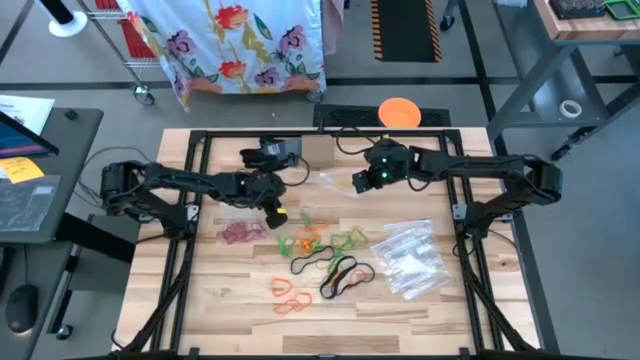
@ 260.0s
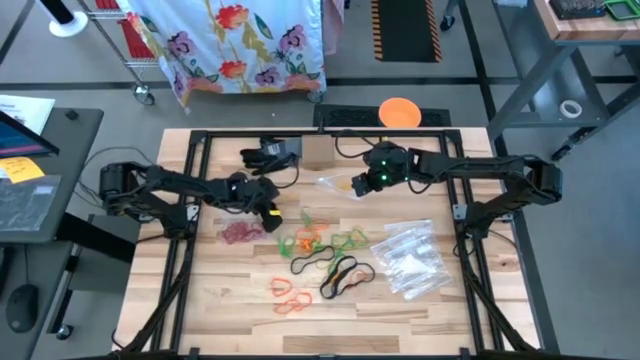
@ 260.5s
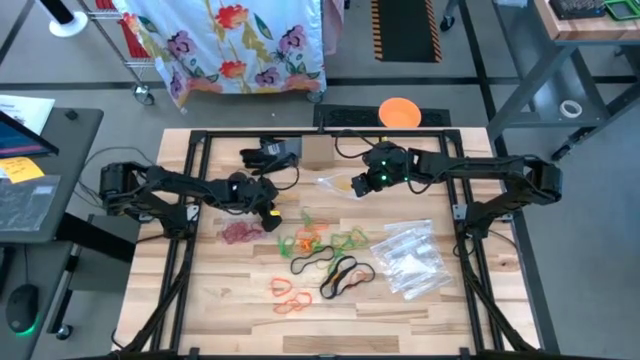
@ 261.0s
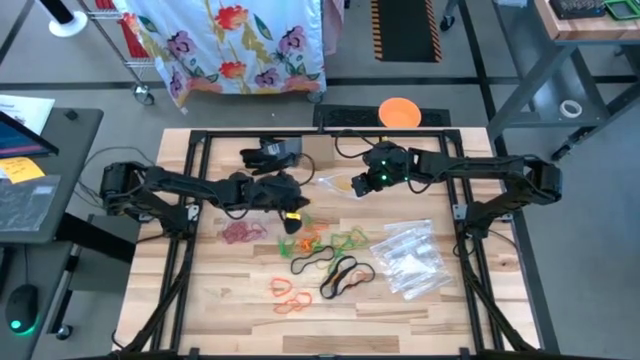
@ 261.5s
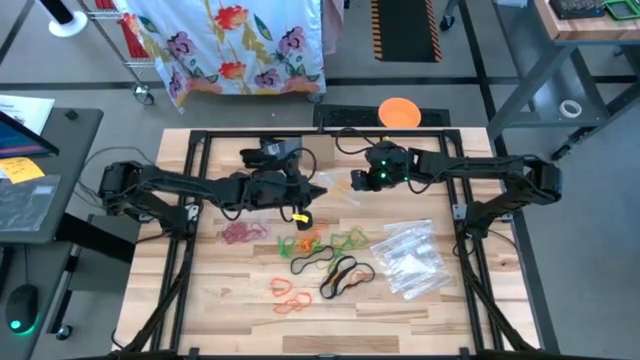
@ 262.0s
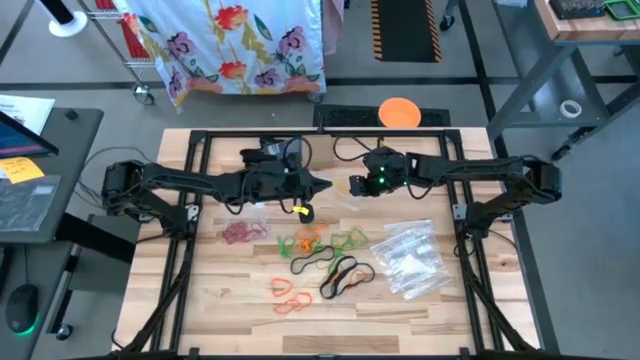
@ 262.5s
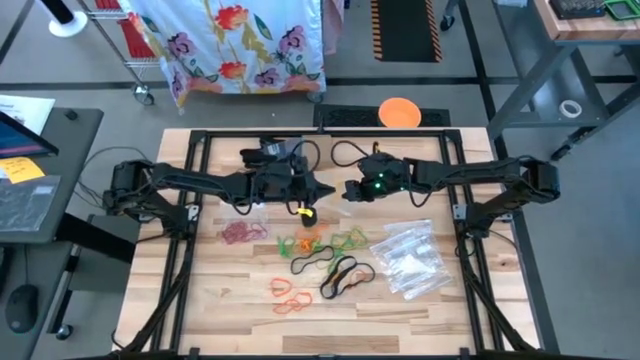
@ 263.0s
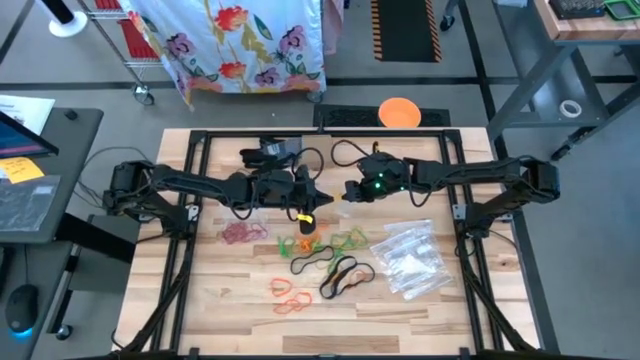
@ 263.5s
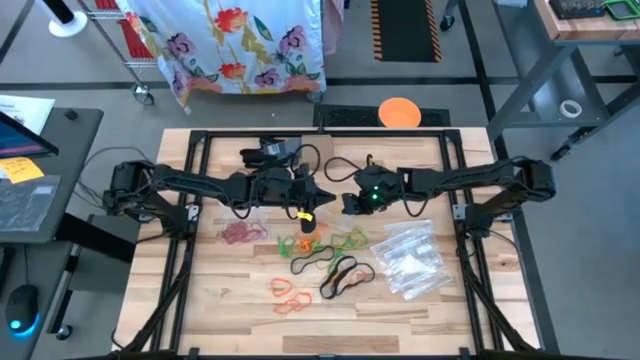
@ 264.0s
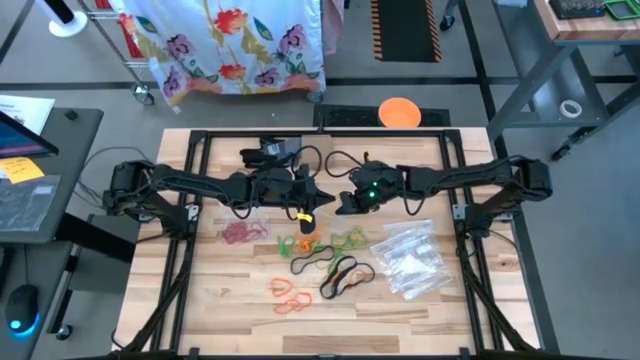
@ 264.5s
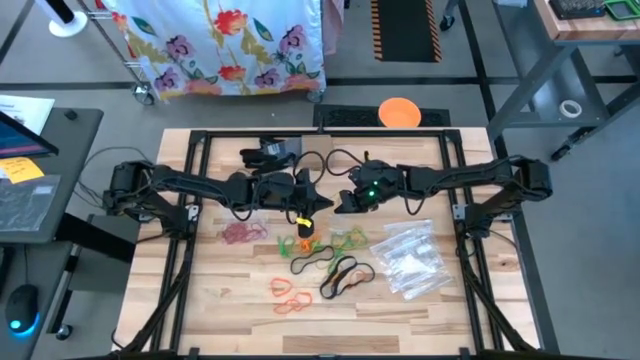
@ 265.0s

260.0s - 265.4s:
Task: Sort rubber bands
Put the yellow rubber band into the transparent zip bag

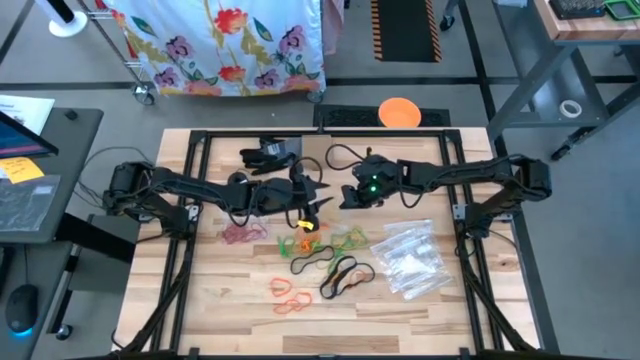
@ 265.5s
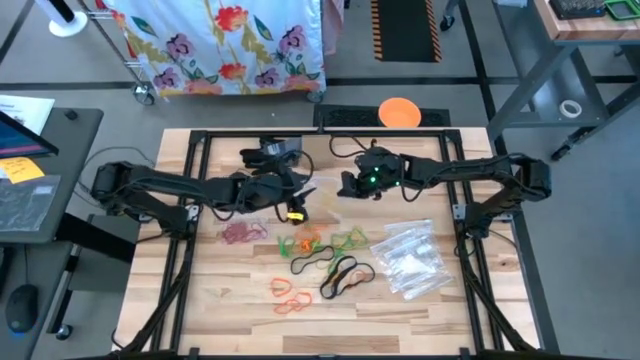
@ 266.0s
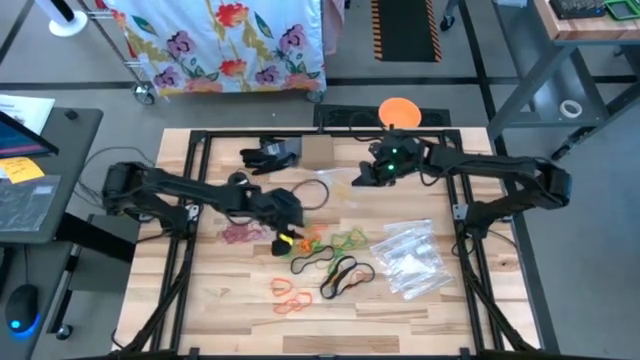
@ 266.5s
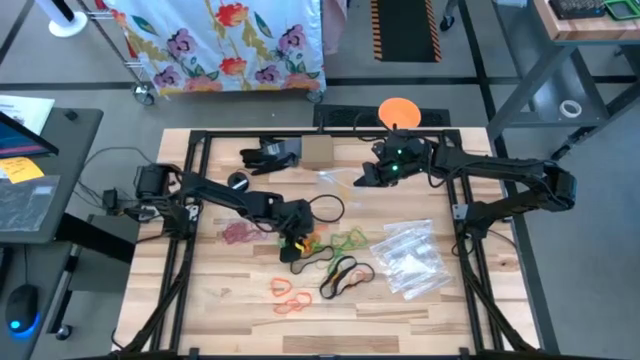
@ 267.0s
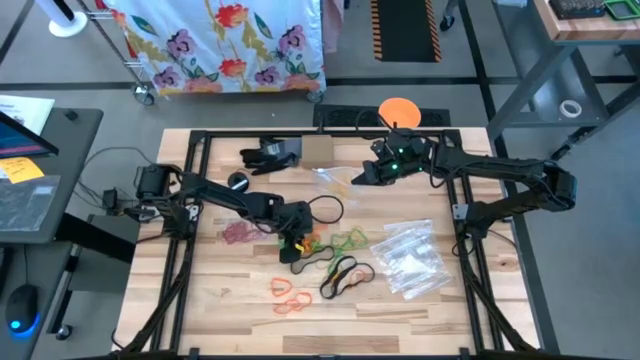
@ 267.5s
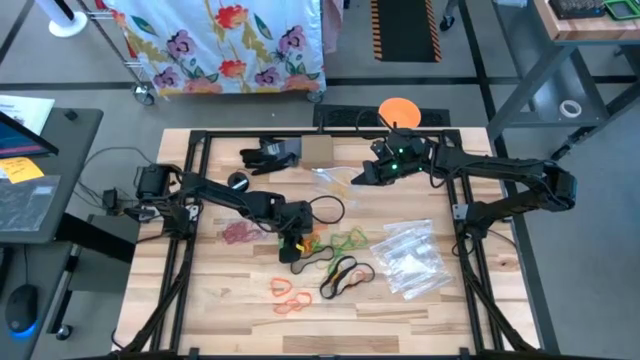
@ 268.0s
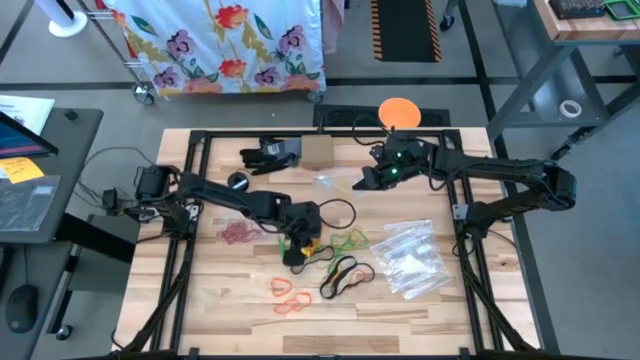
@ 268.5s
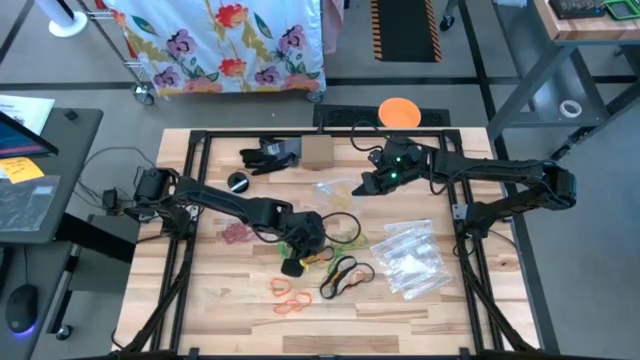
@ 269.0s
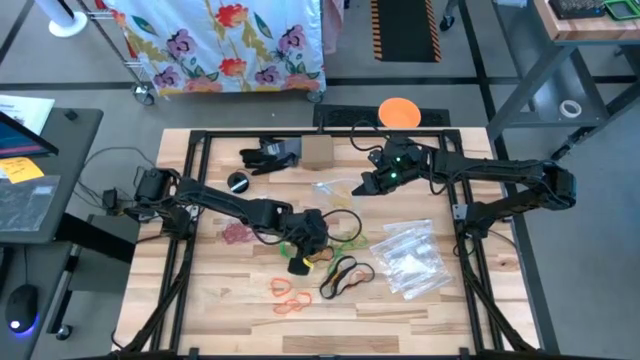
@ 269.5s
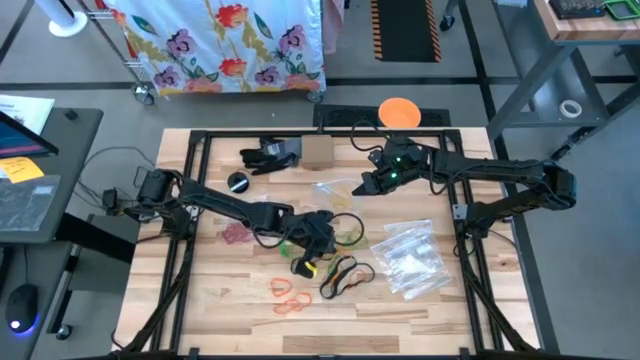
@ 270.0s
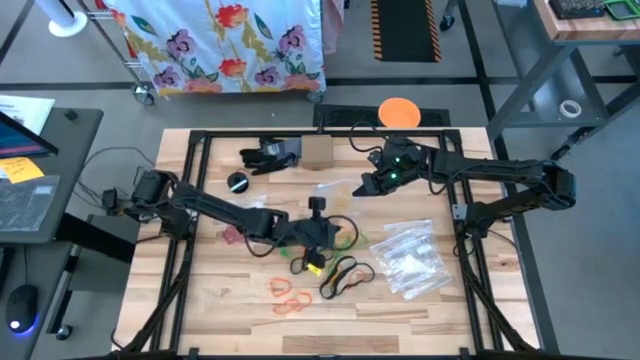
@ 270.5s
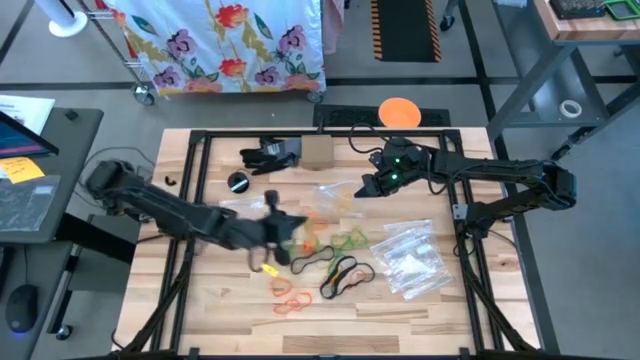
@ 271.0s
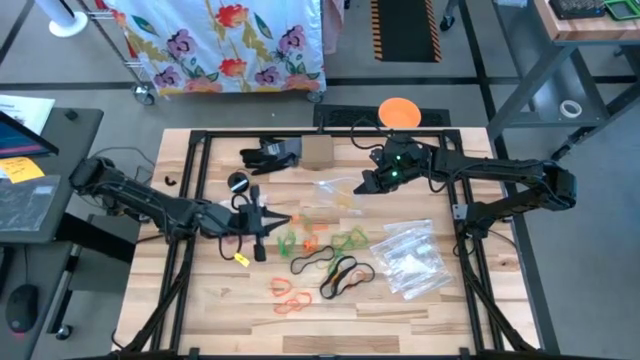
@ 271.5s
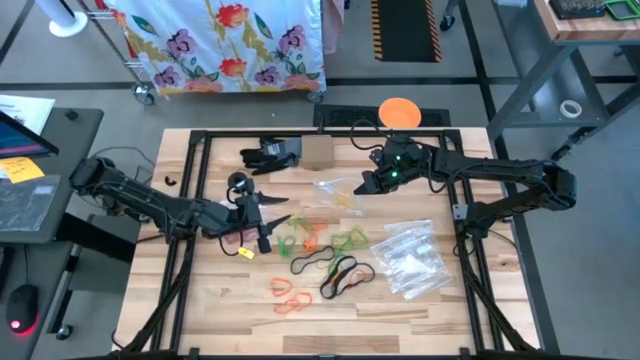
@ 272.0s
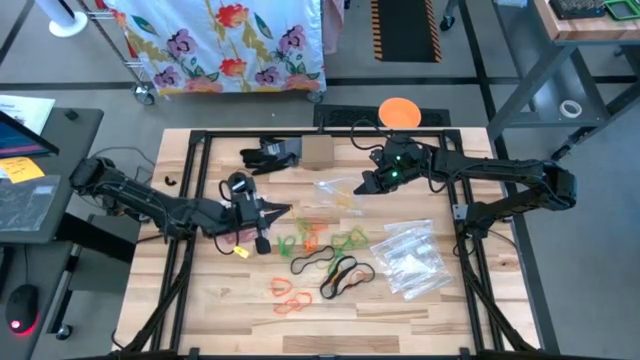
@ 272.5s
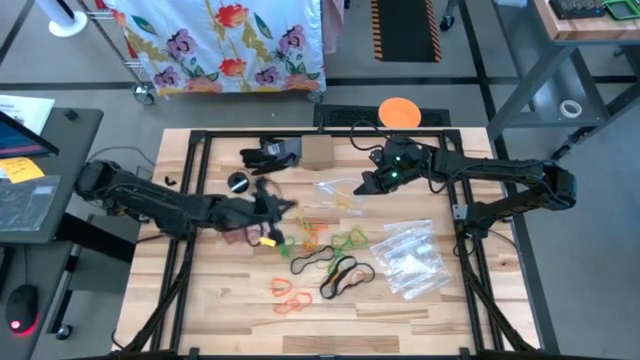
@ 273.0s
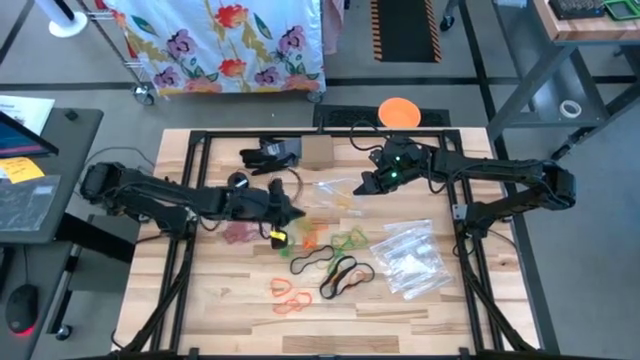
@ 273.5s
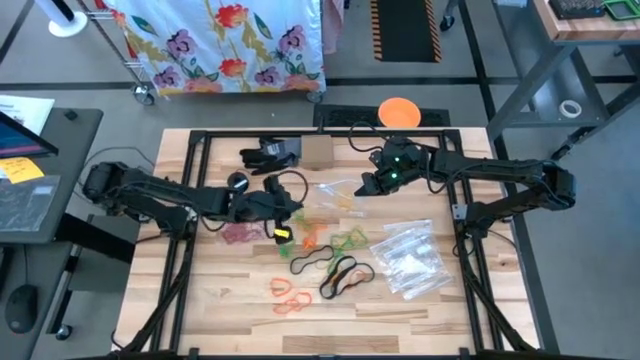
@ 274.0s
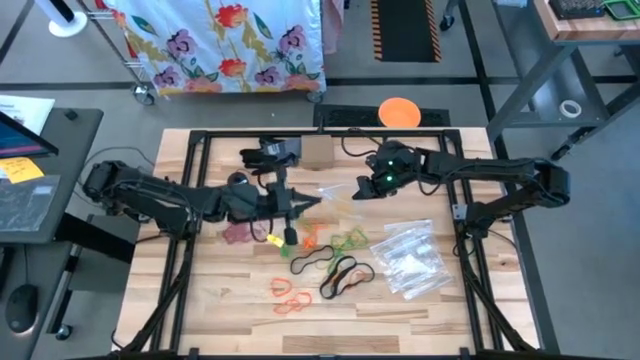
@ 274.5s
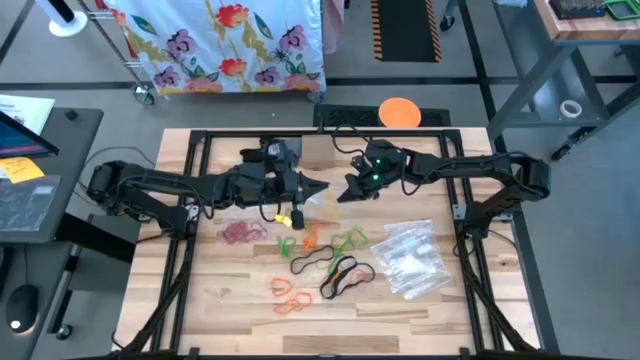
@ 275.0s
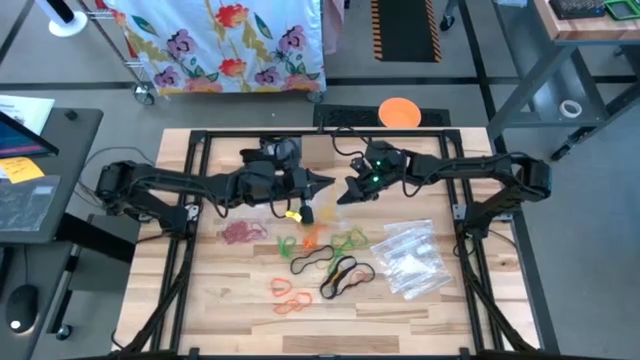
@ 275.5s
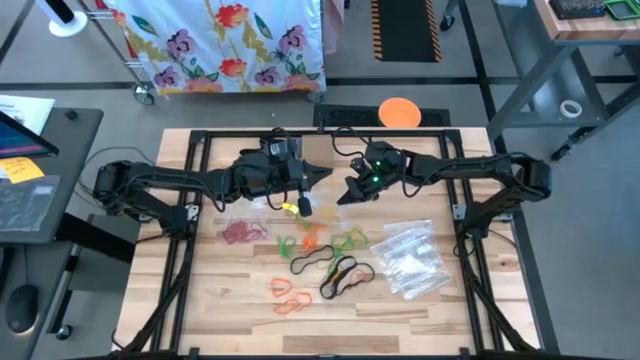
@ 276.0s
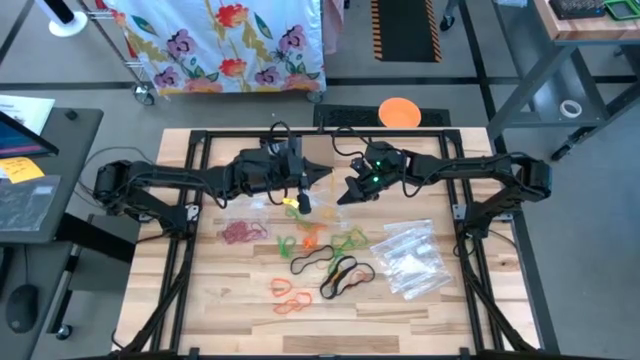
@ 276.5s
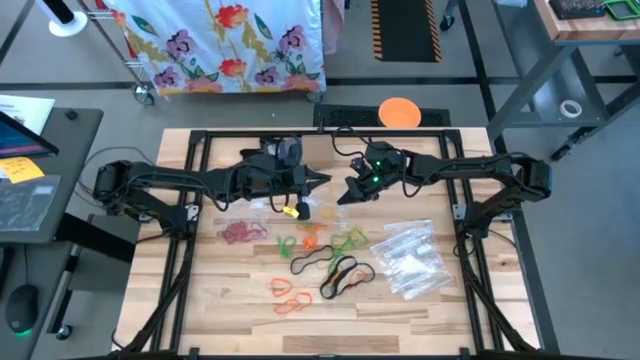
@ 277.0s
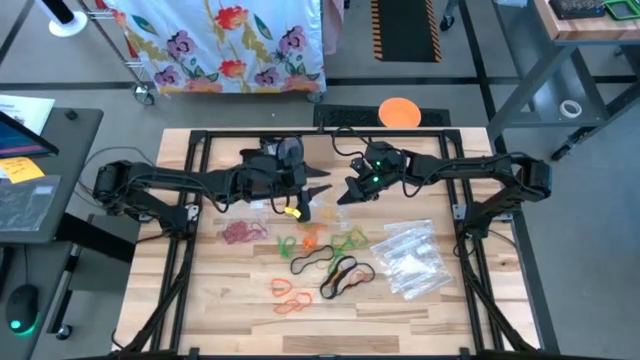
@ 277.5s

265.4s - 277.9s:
Put the yellow rubber band into the transparent zip bag

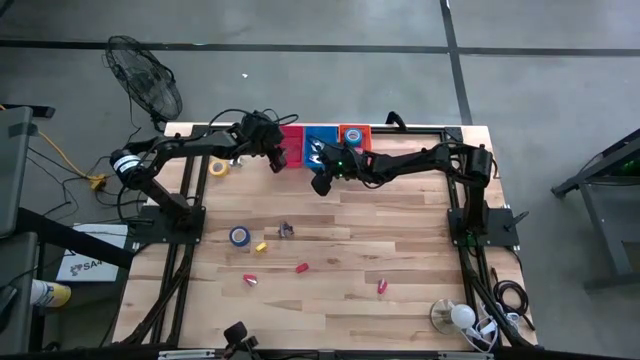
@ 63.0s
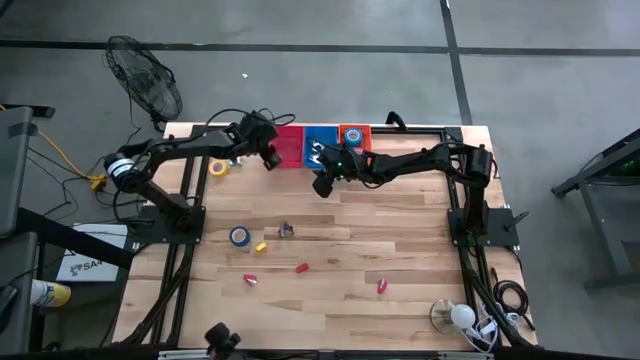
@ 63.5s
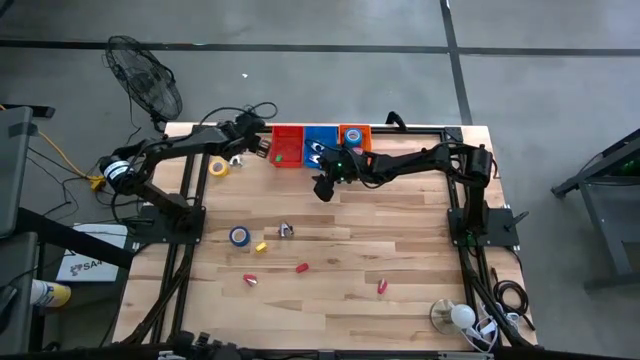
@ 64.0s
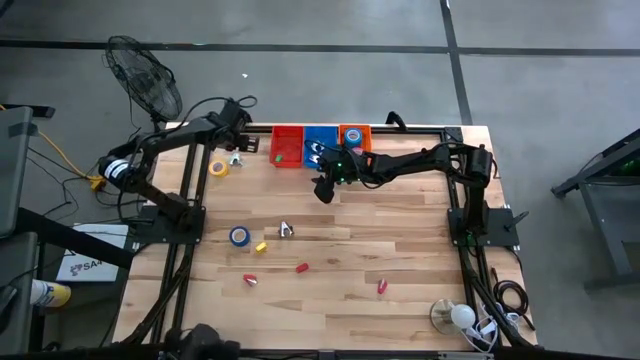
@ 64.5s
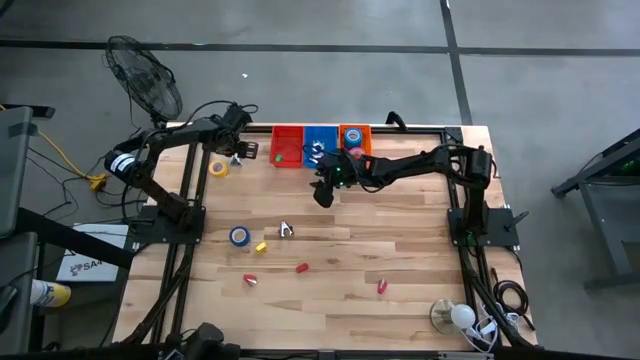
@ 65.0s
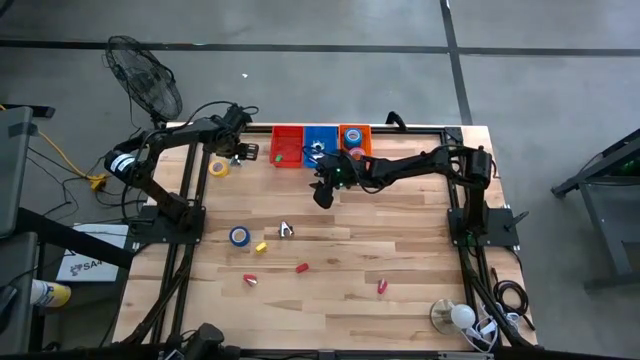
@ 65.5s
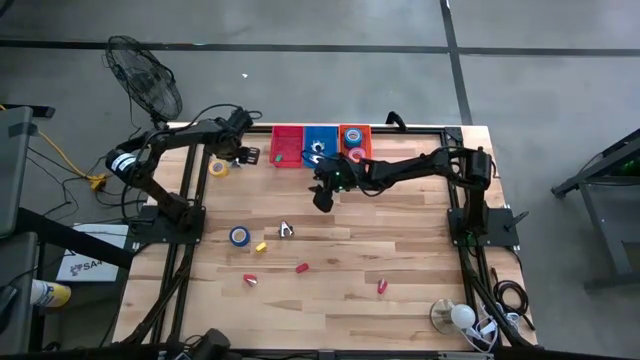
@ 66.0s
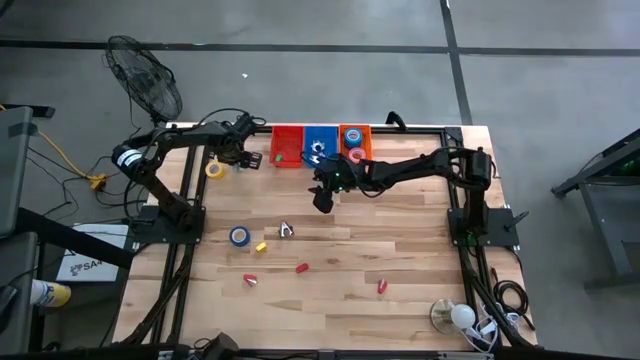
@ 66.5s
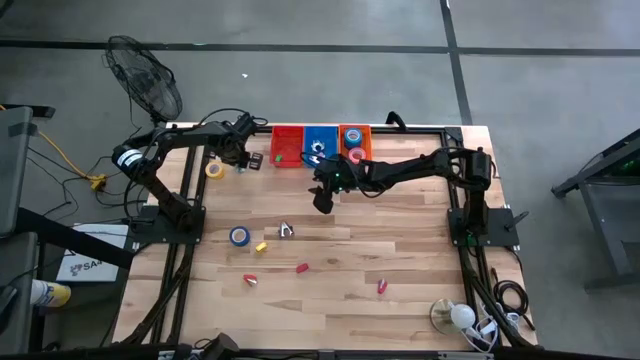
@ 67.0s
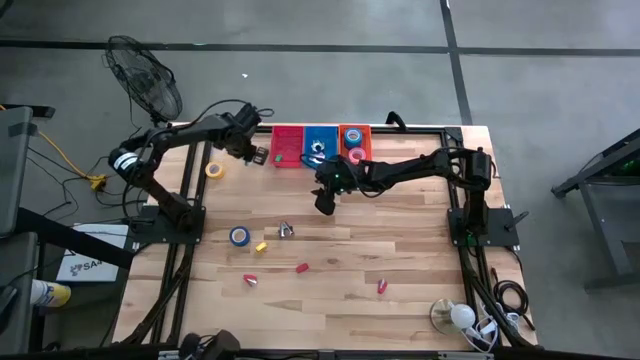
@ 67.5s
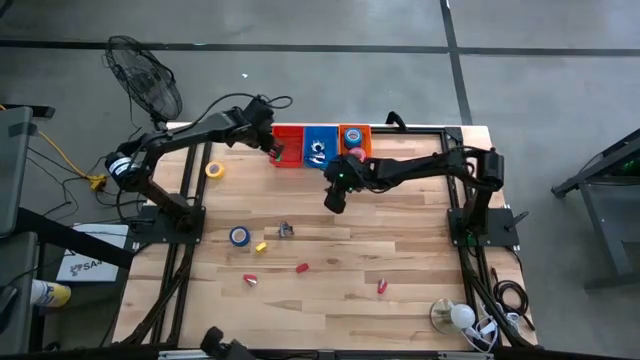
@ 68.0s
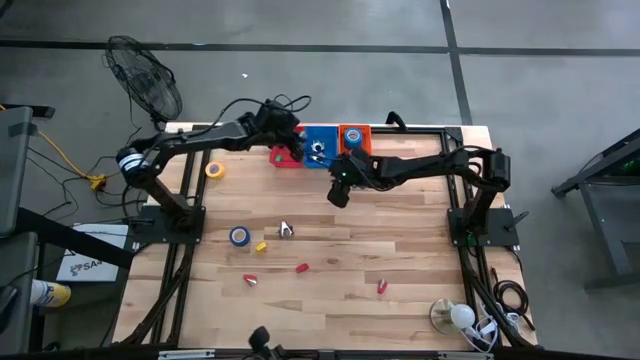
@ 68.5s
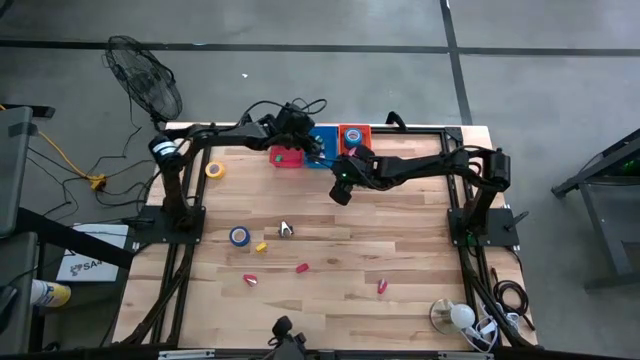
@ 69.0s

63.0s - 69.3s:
Task: Pick and place Stapler, Stapler remover, tape
Put the blue staple remover into the blue bin
